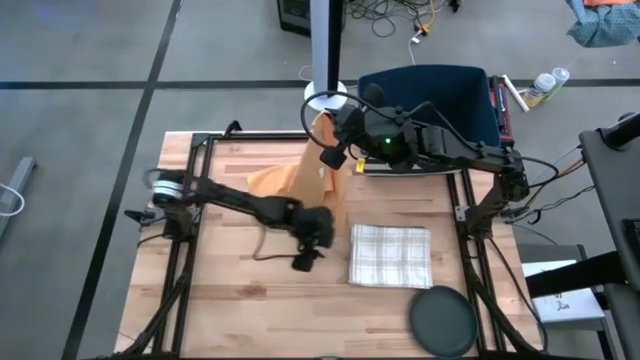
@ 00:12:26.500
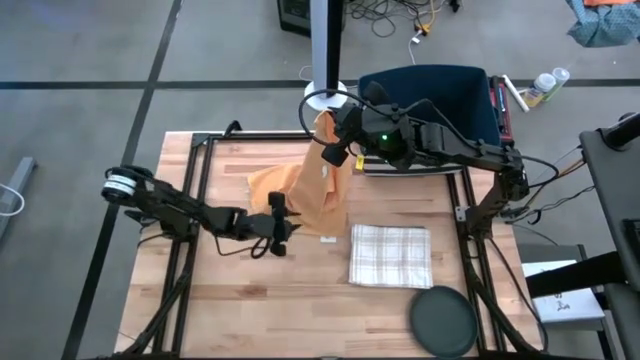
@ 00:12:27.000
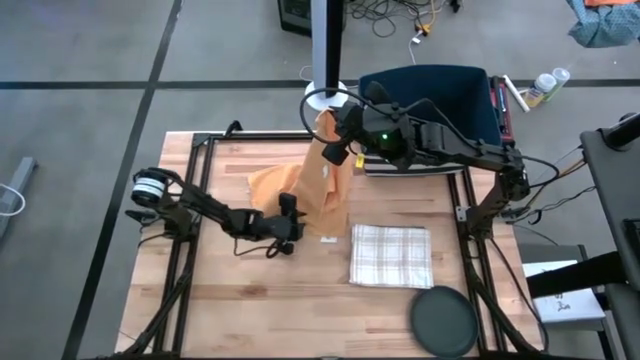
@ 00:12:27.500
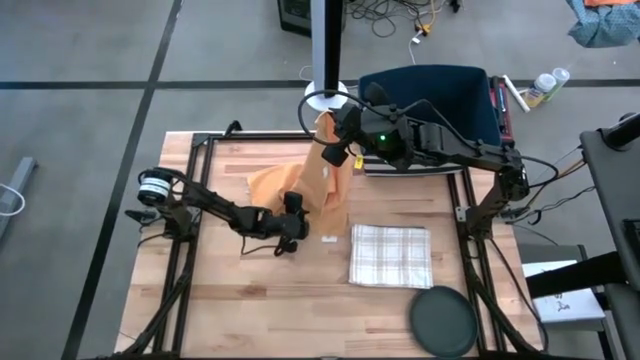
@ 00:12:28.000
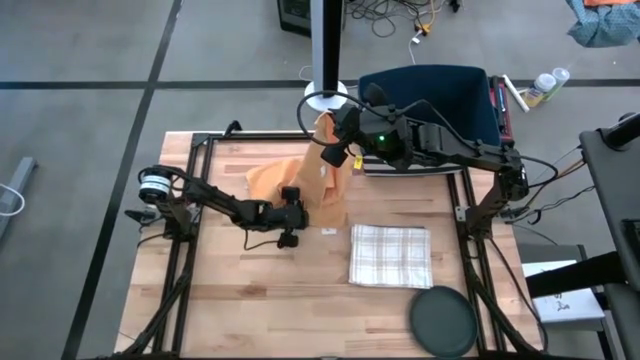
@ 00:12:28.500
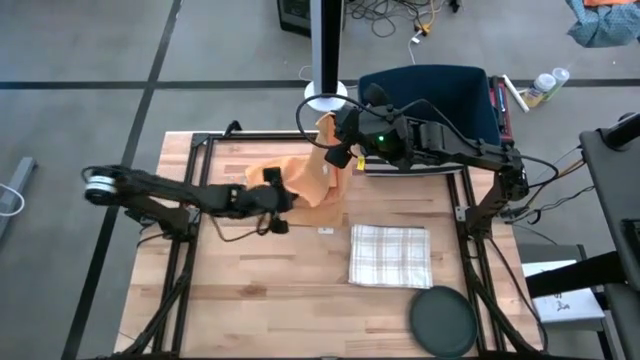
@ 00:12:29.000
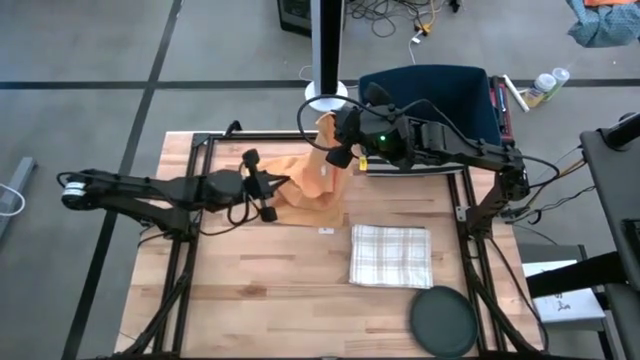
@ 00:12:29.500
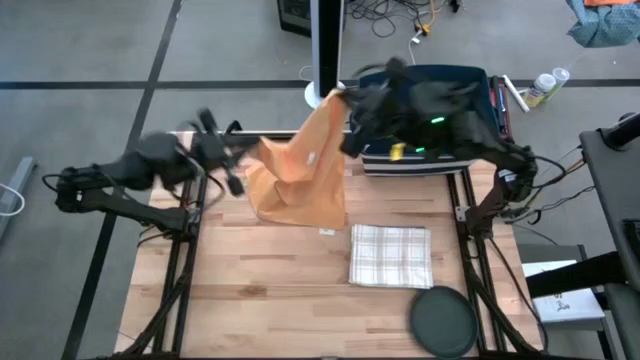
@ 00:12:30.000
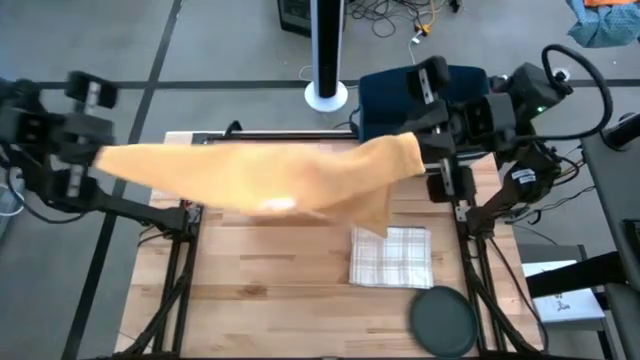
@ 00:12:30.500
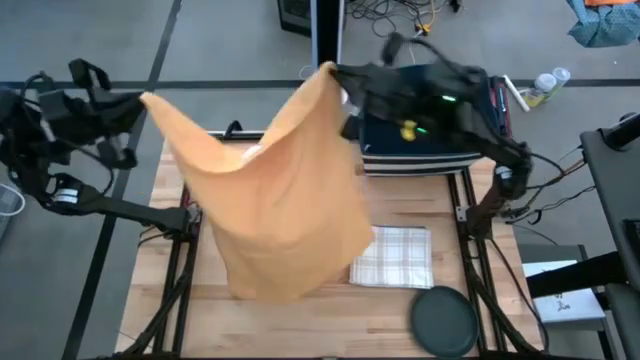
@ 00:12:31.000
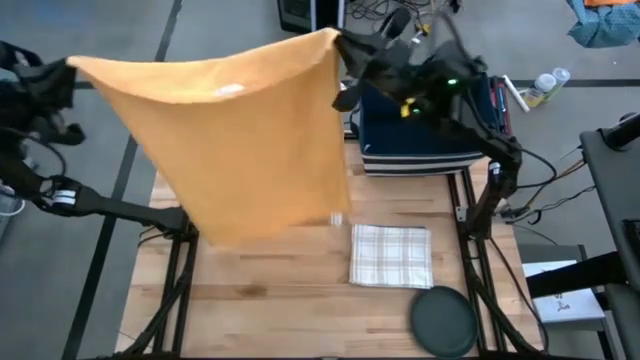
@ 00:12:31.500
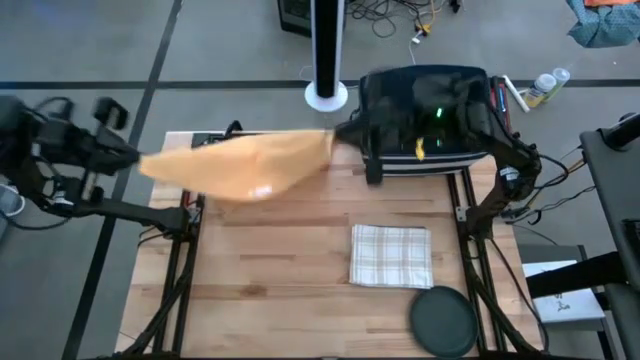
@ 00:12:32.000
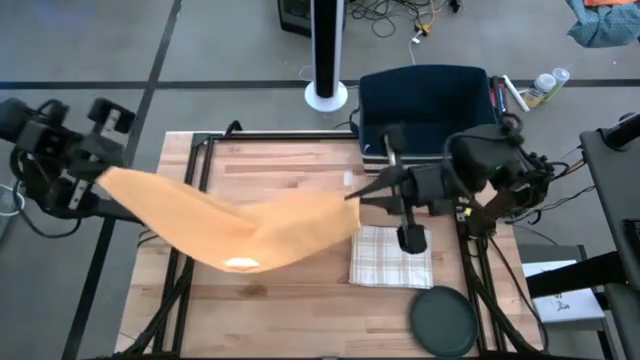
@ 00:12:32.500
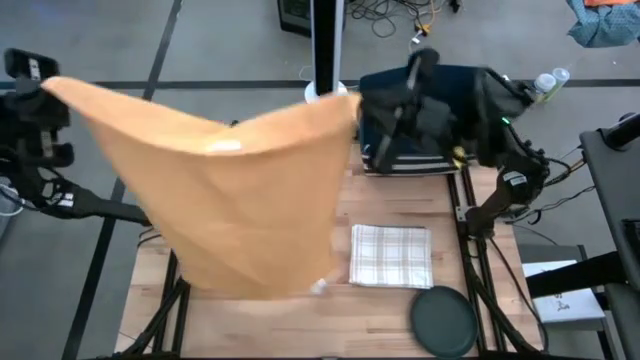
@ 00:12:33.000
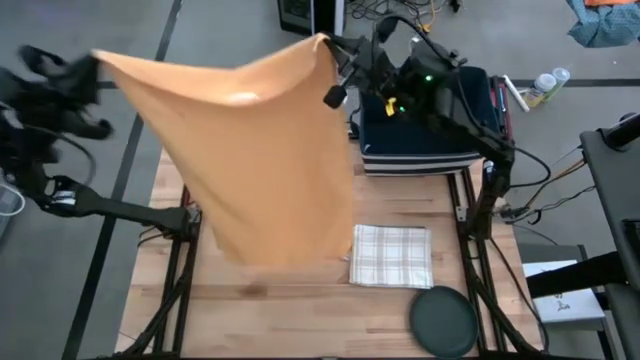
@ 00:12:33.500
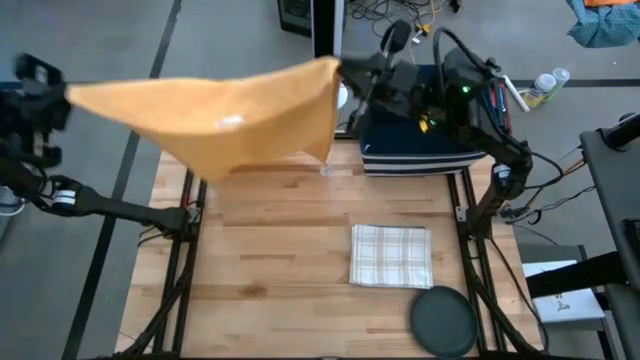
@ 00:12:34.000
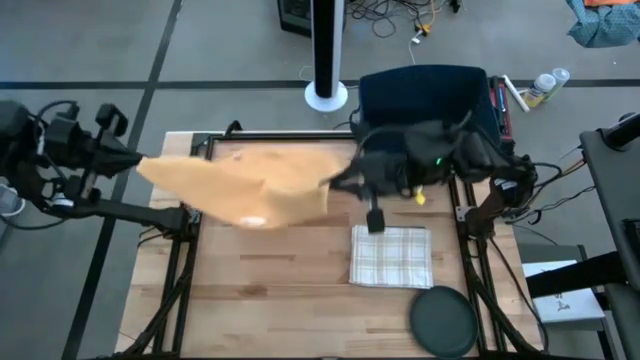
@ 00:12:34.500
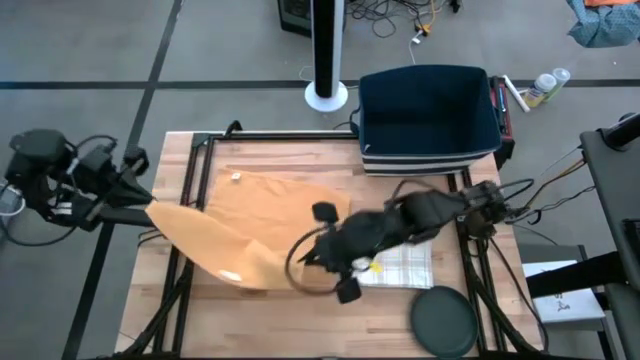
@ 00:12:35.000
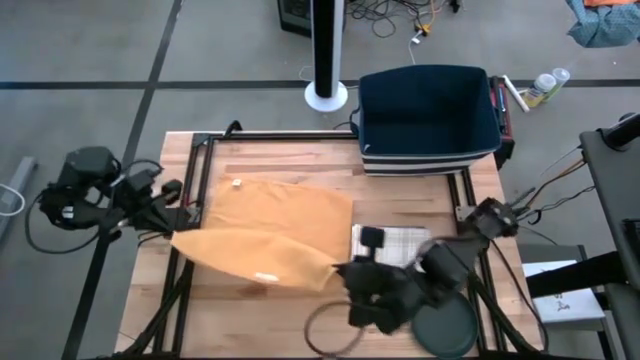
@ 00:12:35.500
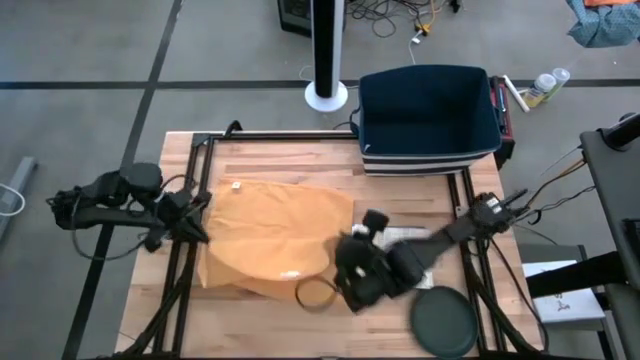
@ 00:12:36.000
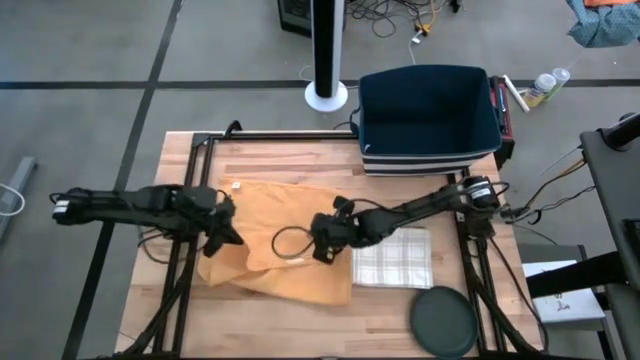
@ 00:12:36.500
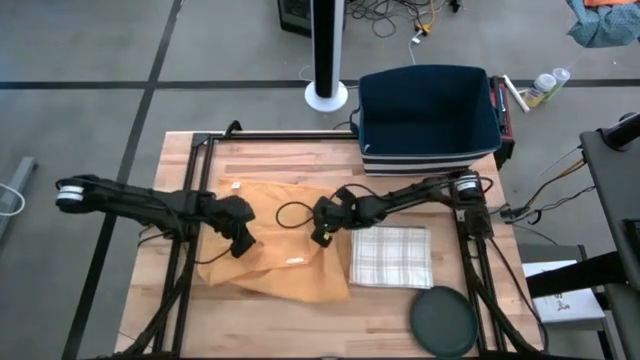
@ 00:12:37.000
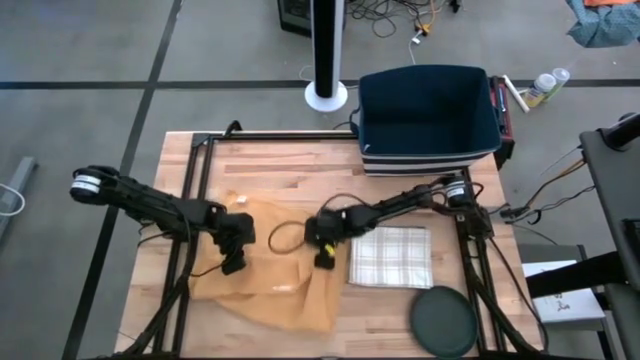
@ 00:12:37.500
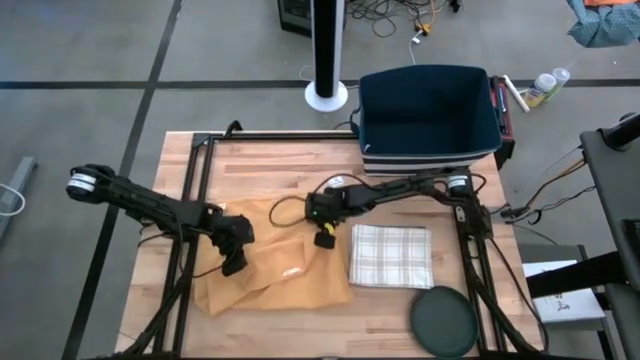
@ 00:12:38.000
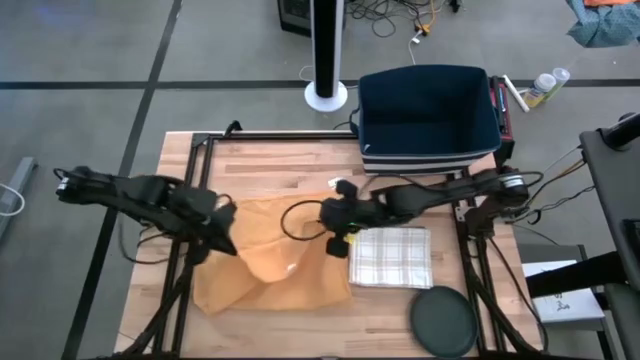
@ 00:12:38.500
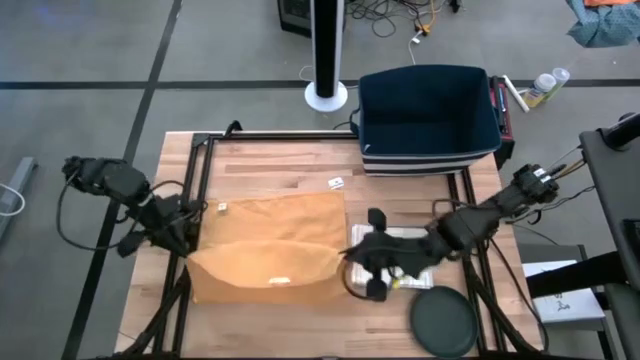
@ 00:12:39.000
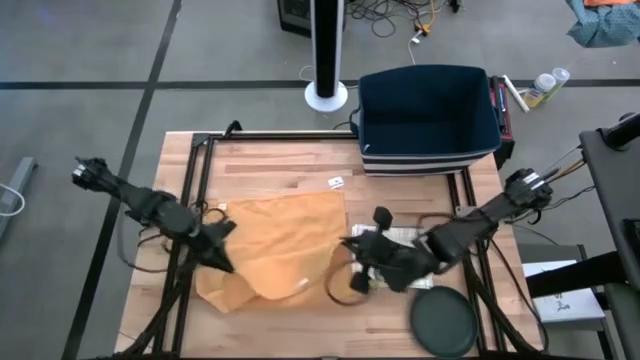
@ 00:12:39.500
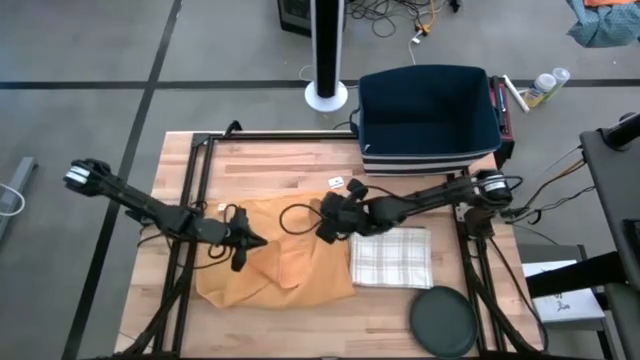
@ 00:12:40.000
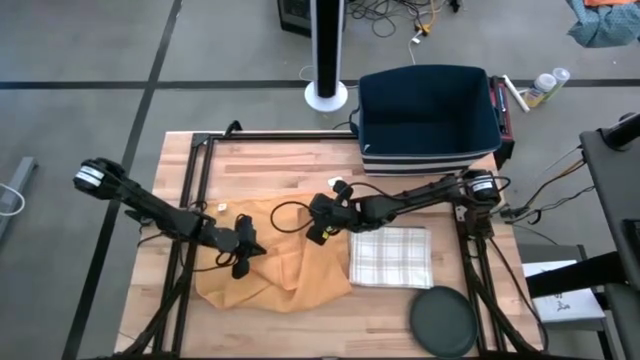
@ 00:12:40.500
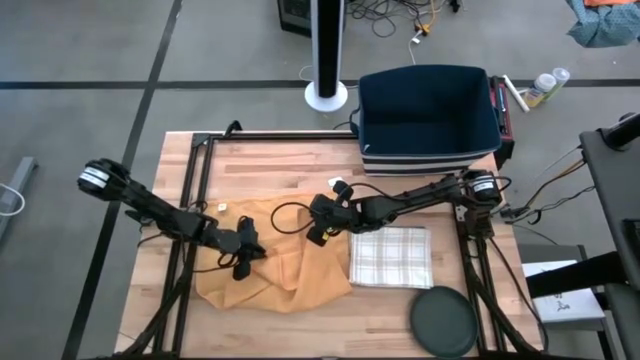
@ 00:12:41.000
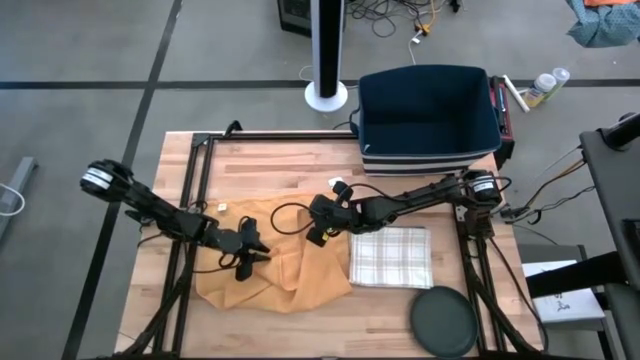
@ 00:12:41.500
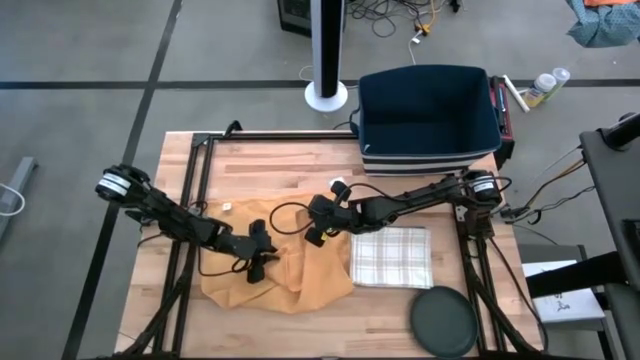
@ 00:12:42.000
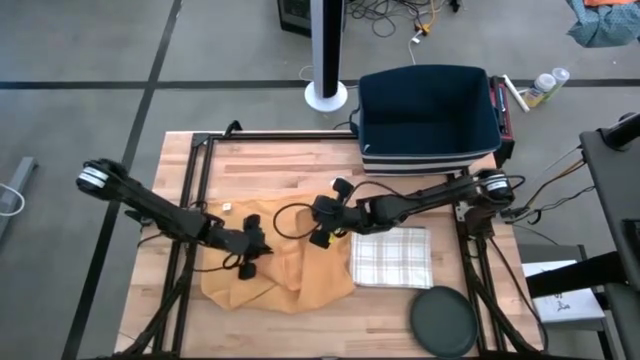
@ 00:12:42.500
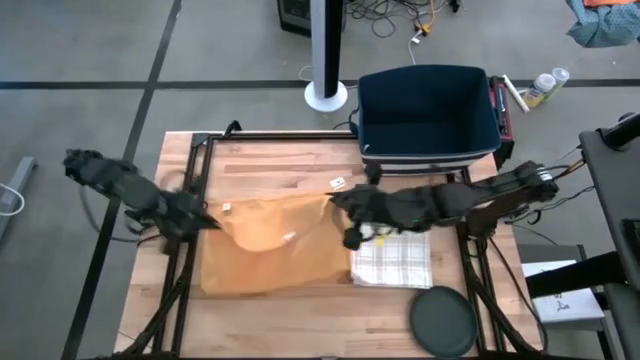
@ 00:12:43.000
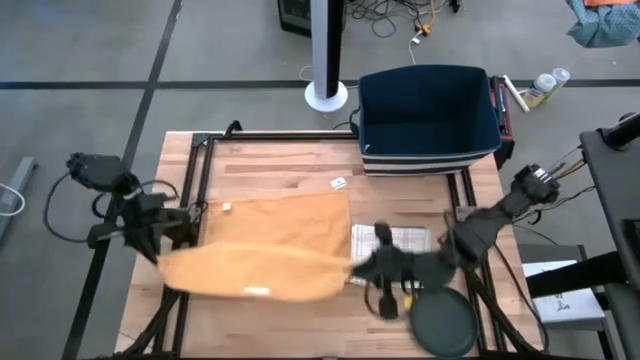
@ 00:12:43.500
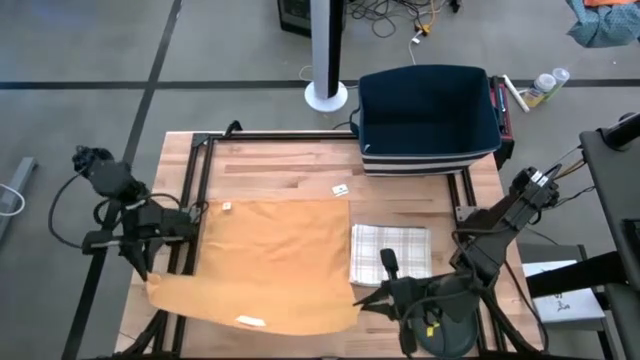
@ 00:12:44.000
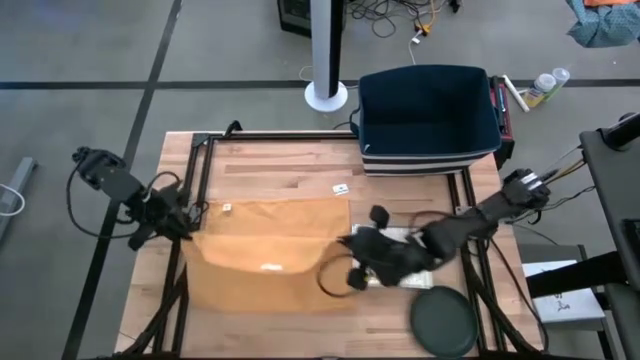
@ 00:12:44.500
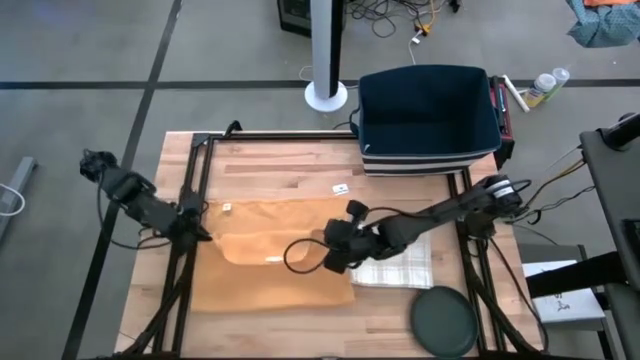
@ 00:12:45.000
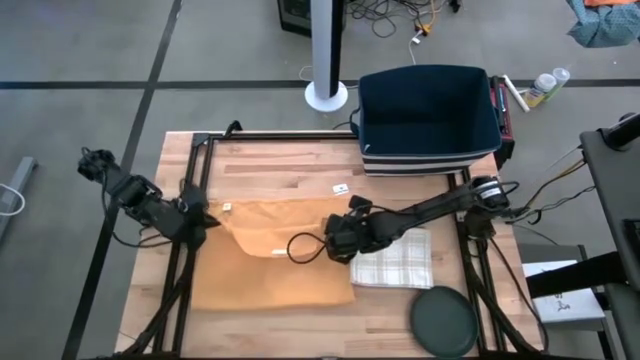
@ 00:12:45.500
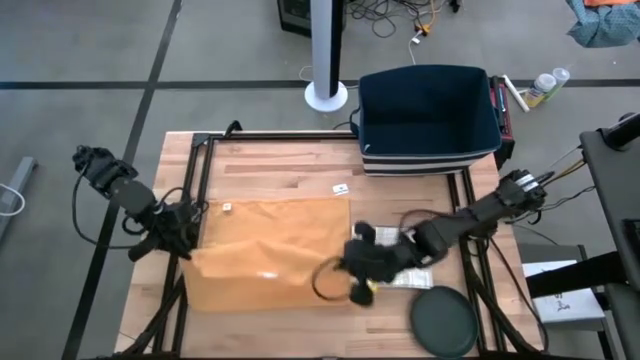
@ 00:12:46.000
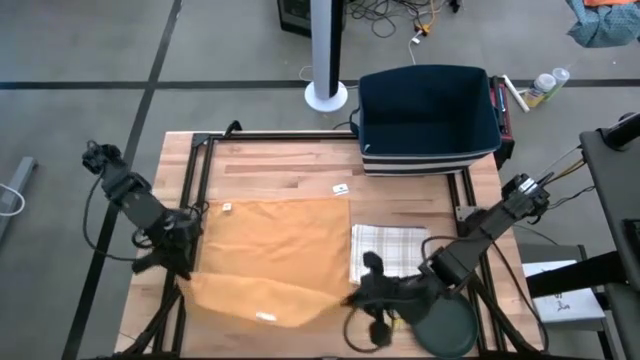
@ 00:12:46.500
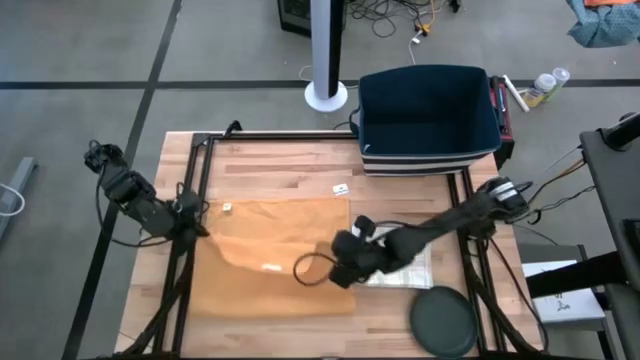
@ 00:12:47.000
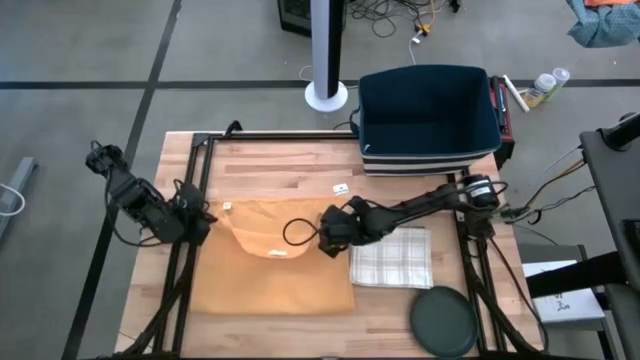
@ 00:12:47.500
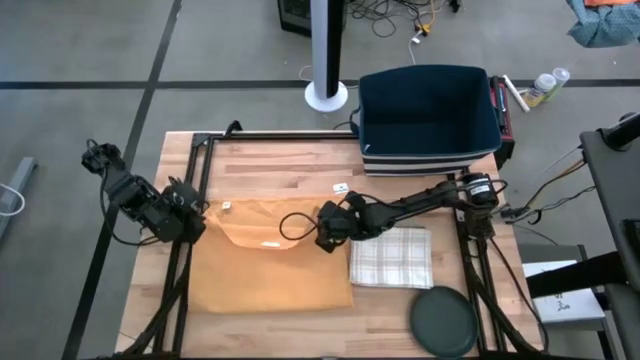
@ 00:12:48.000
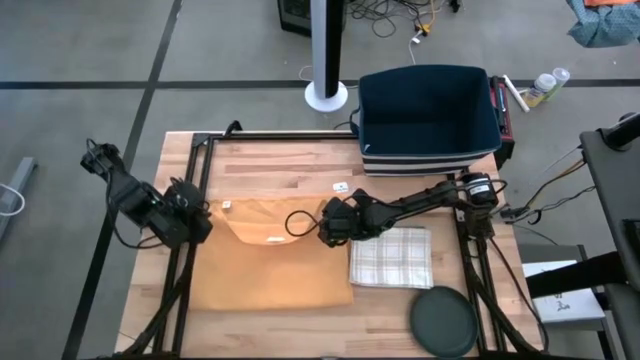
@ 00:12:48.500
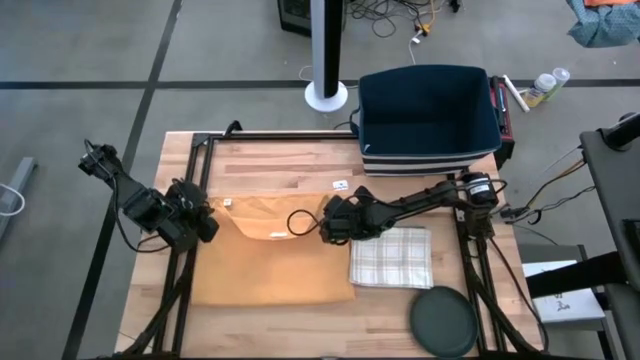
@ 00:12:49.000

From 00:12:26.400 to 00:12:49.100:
Task: Fold kitchen towel into neat rectangle
Fold the orange towel
